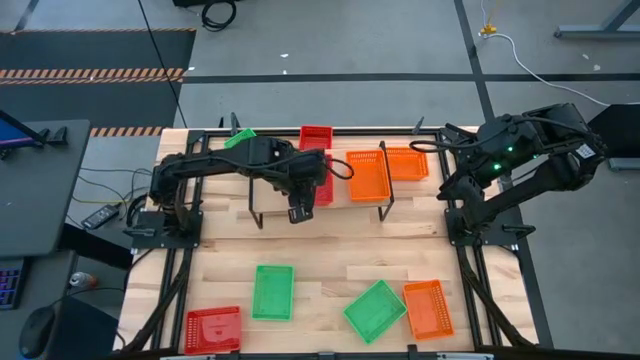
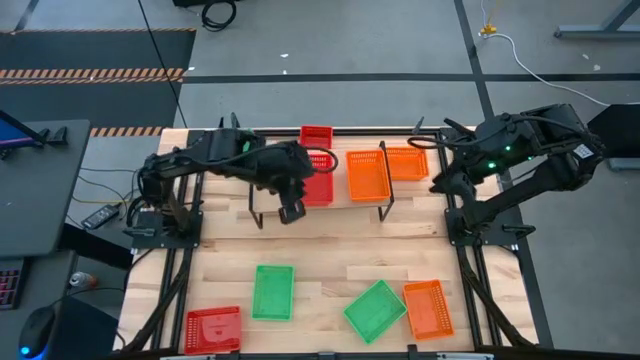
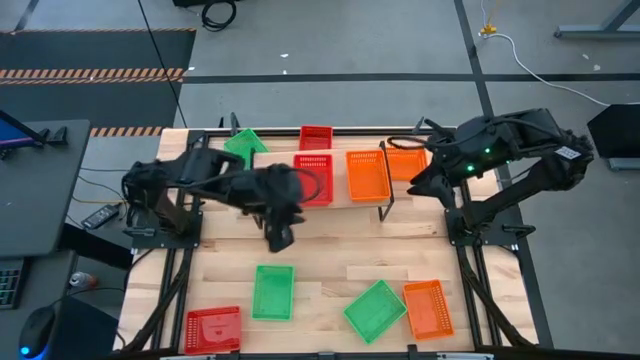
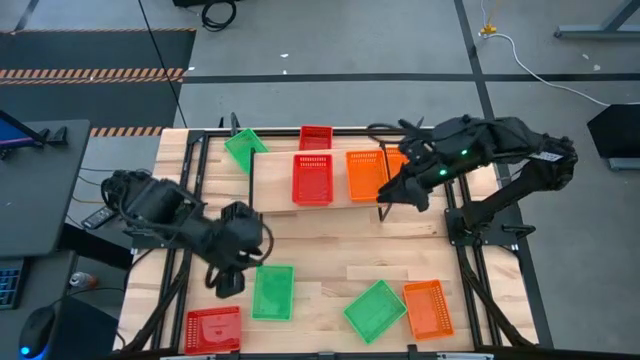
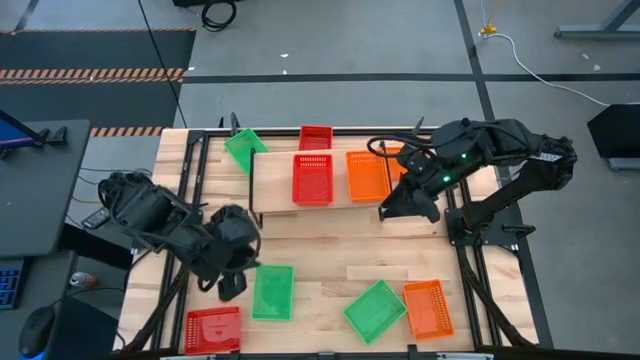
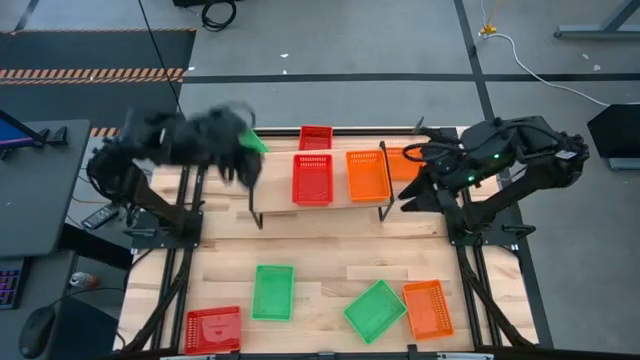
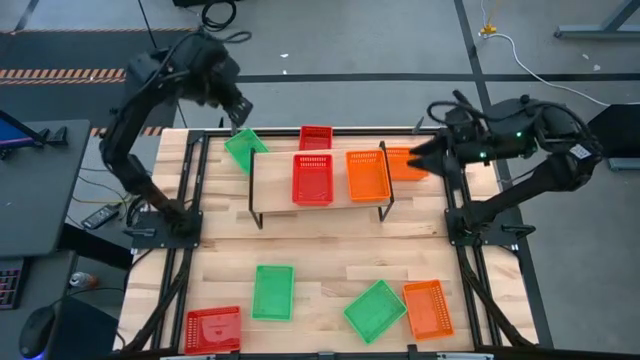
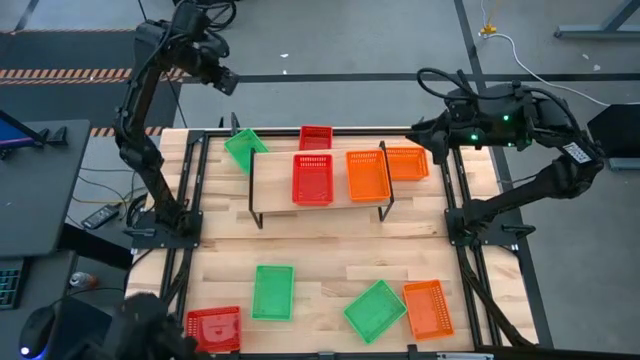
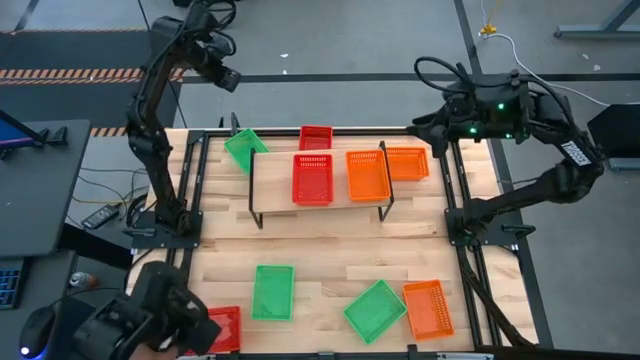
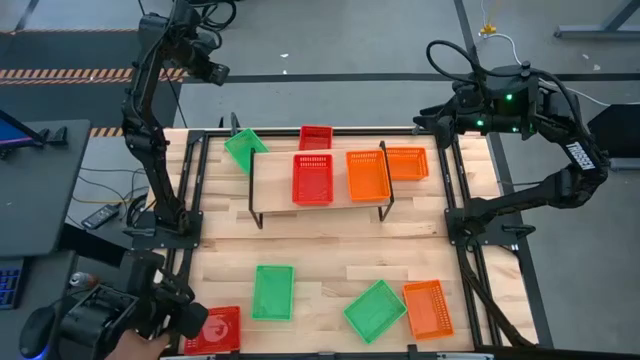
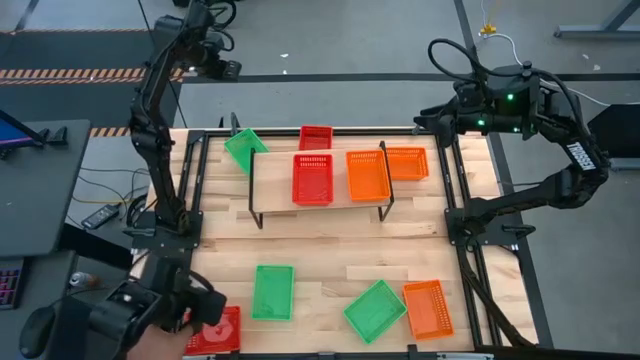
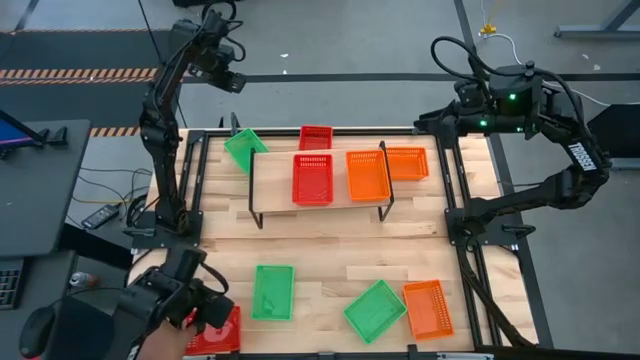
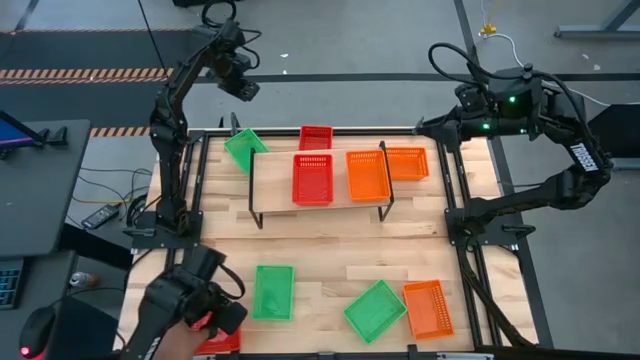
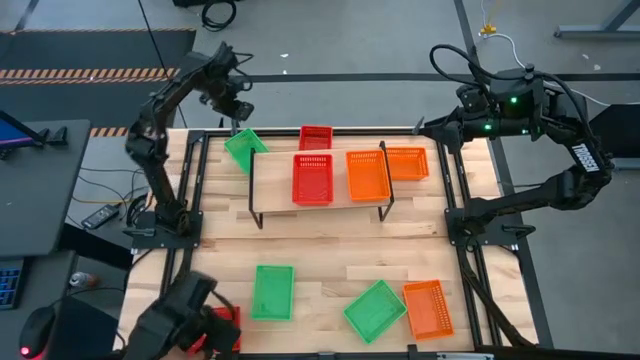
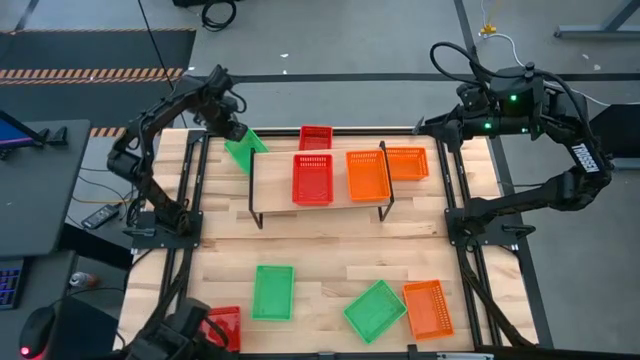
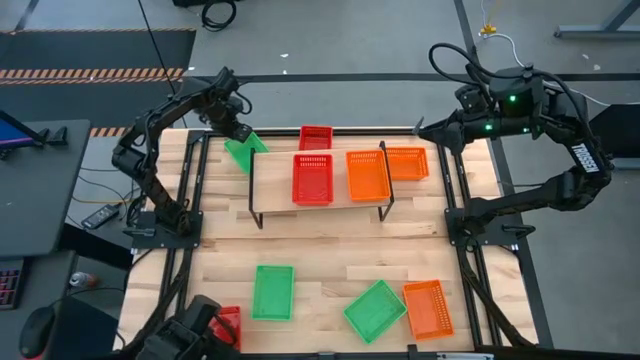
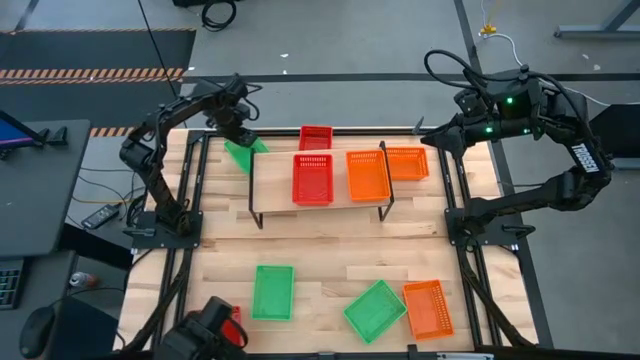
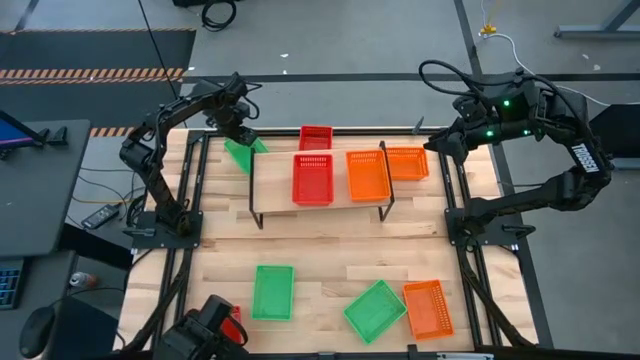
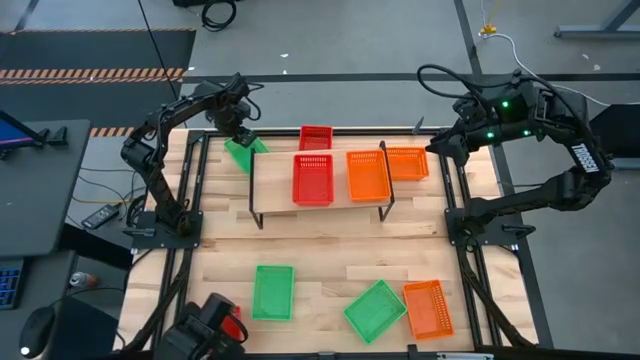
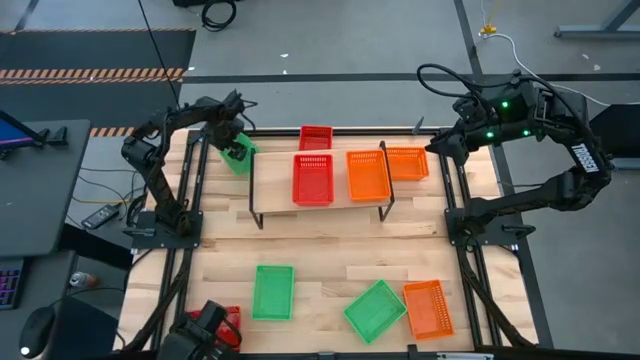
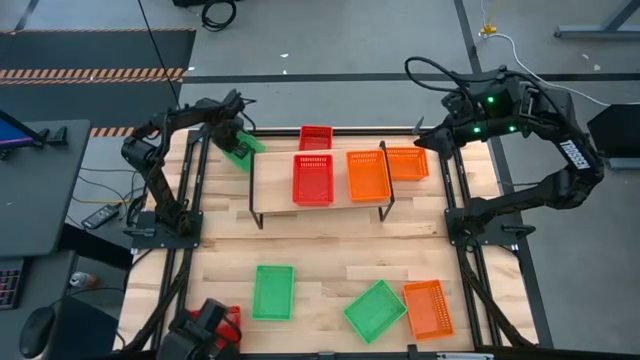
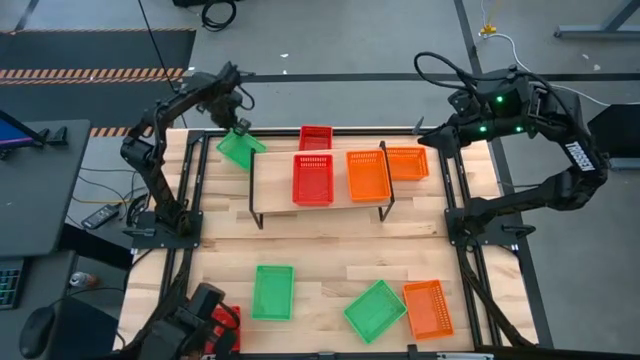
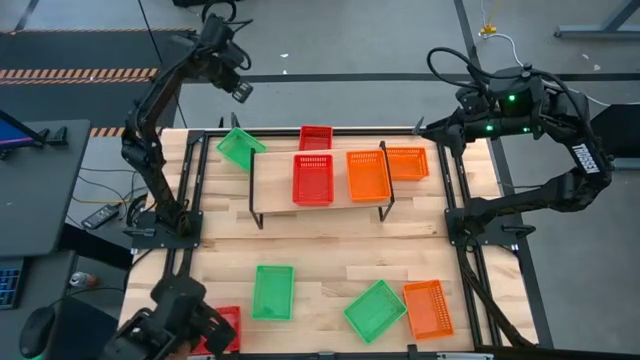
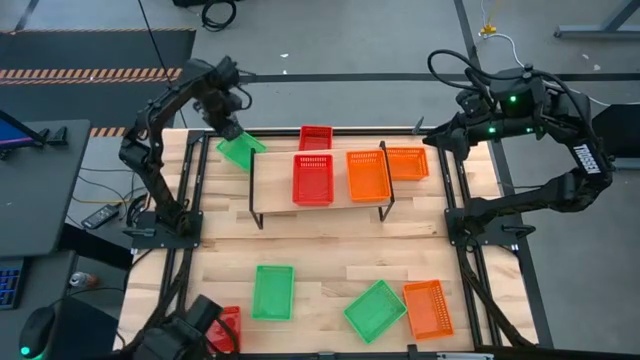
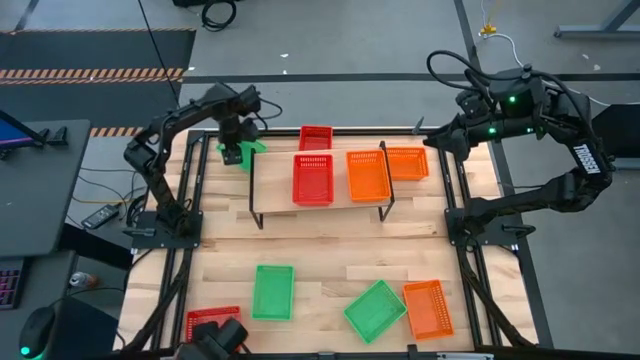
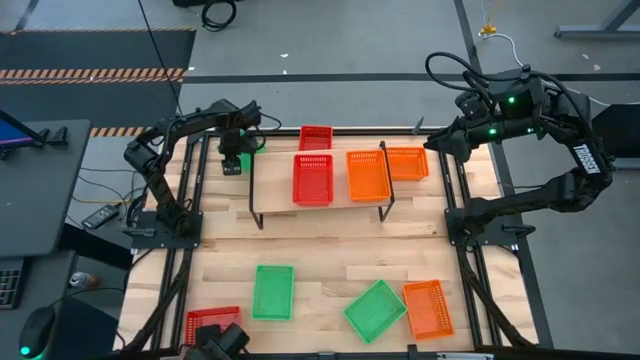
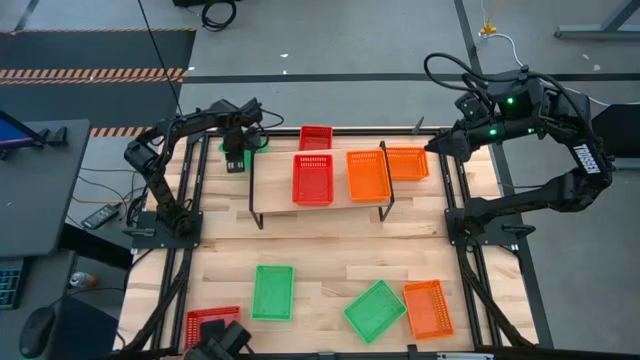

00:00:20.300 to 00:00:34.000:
Task: Stack baskets on shelf by color
Put the top green bin into the shelf

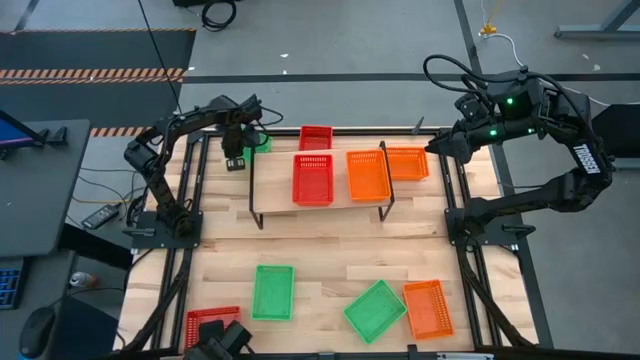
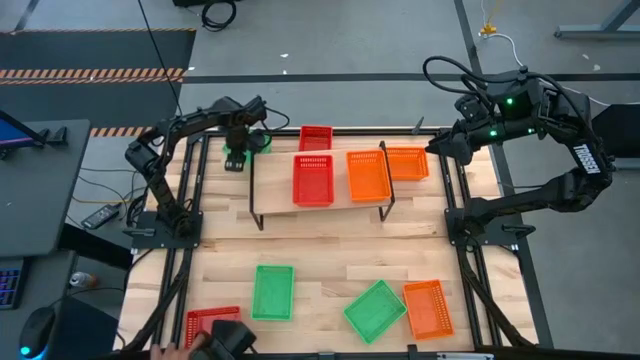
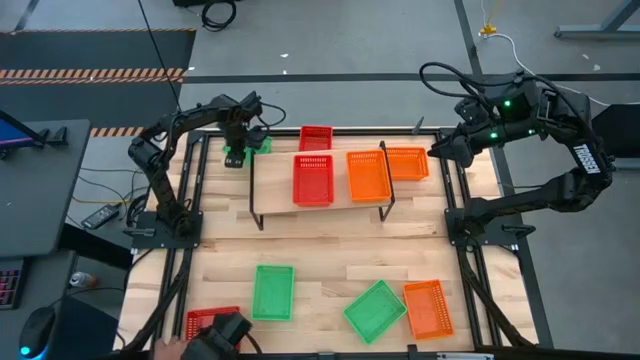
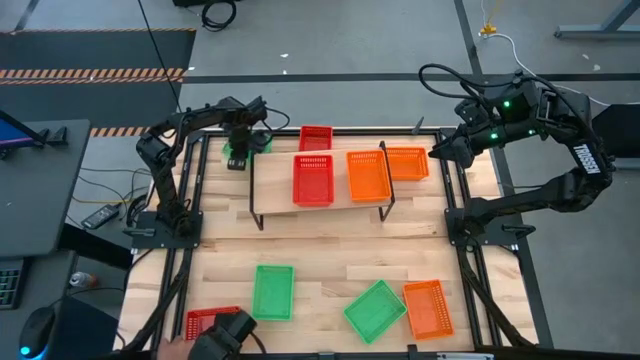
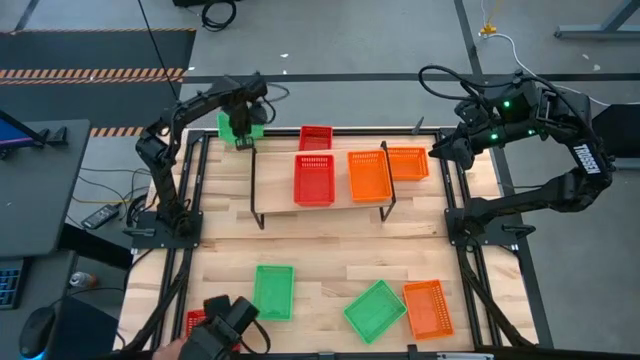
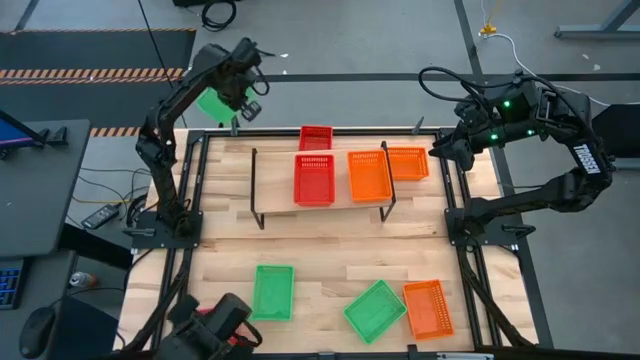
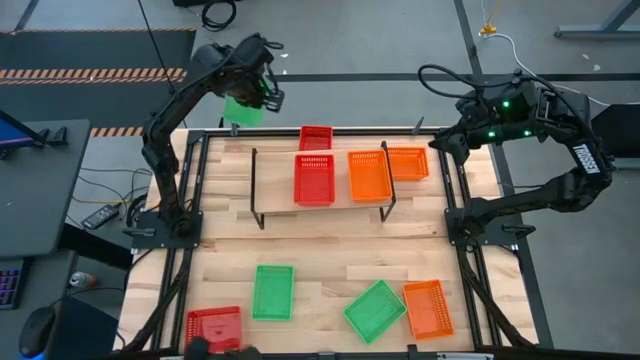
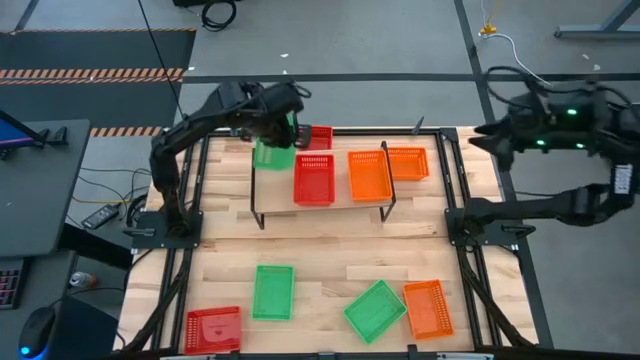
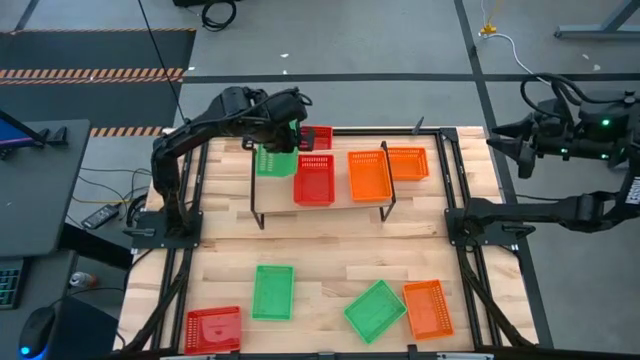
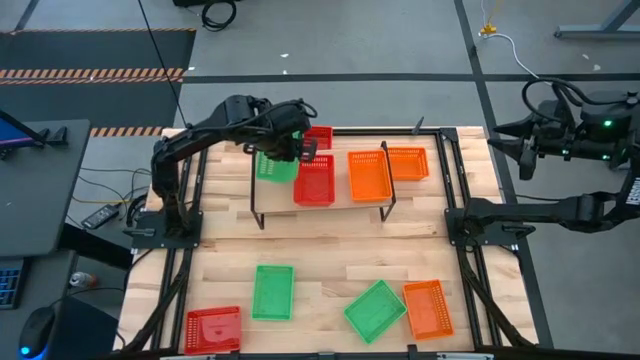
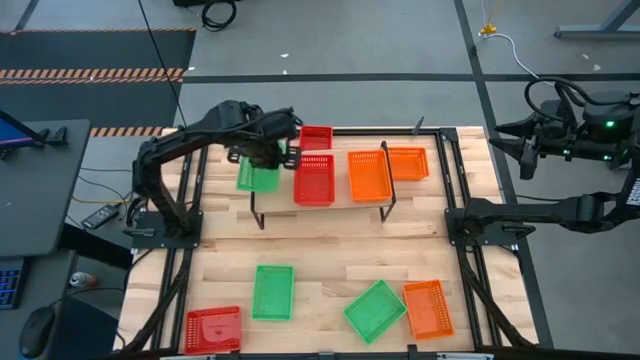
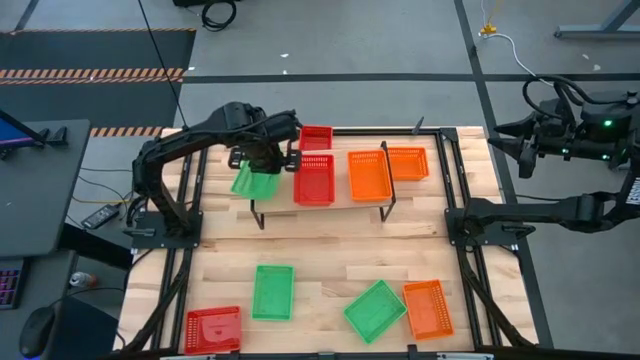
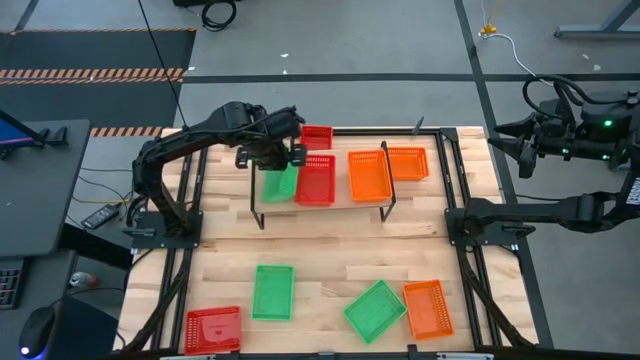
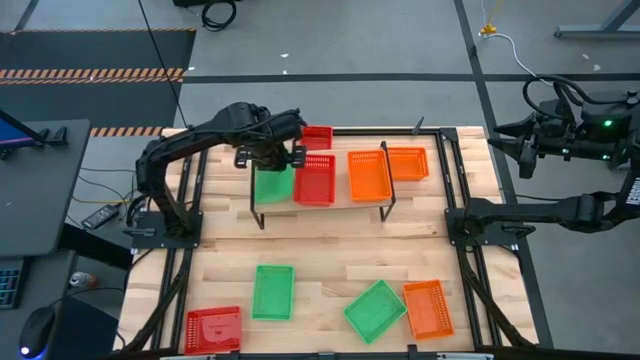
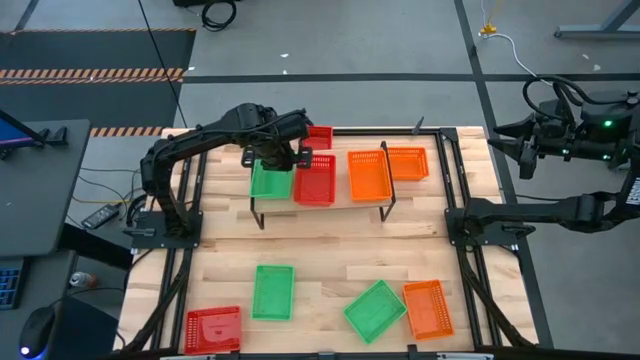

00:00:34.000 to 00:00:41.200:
Put the top green bin into the shelf

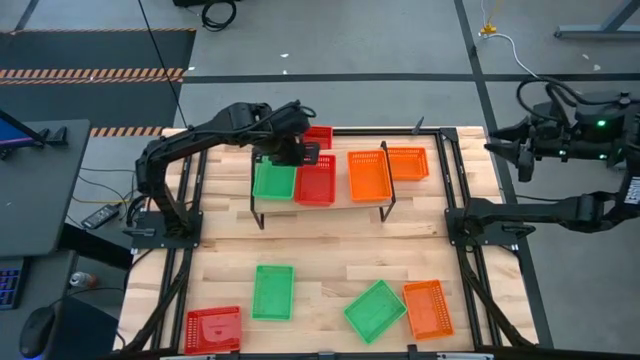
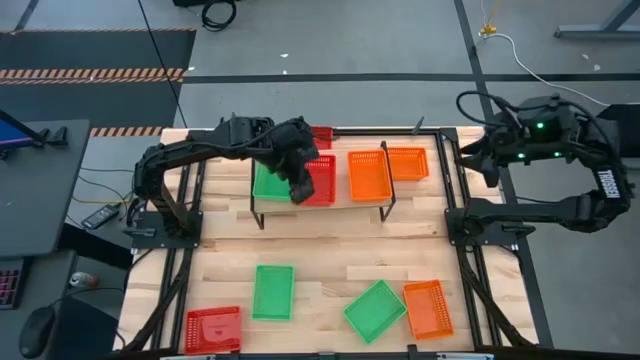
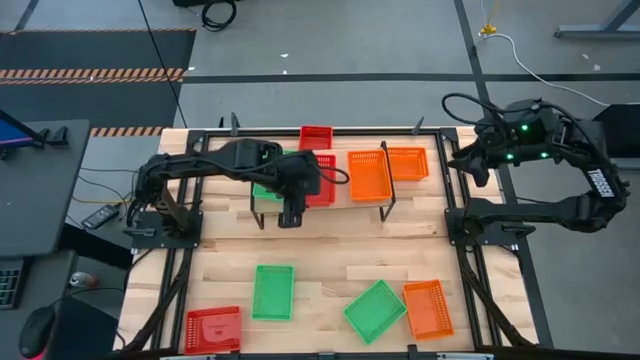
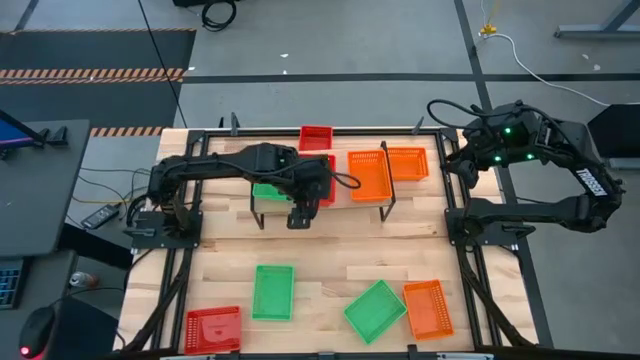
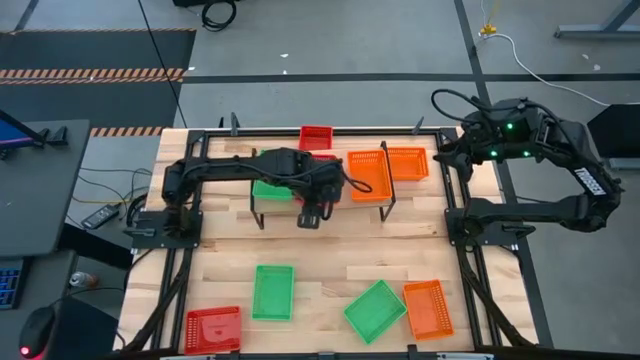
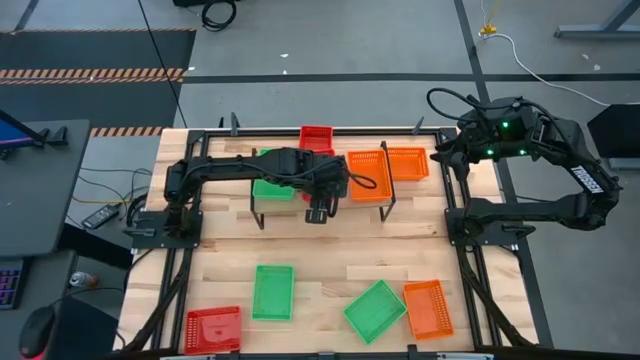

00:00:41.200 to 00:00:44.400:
Adjust the red bin on the shelf
